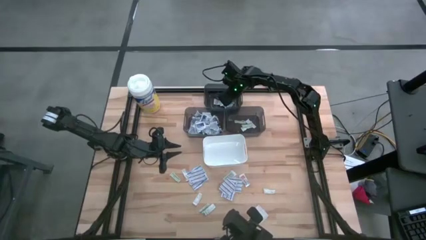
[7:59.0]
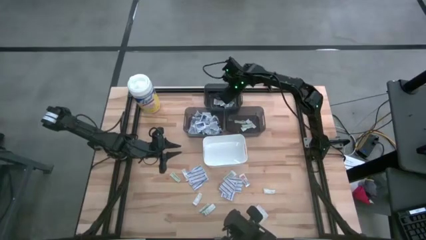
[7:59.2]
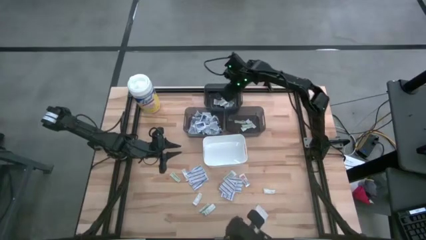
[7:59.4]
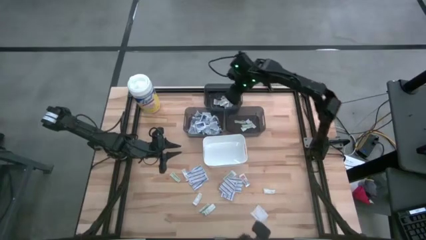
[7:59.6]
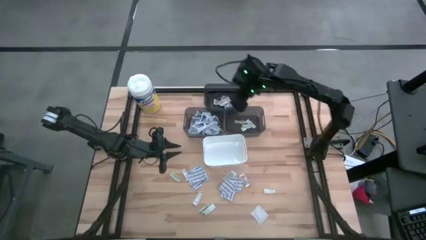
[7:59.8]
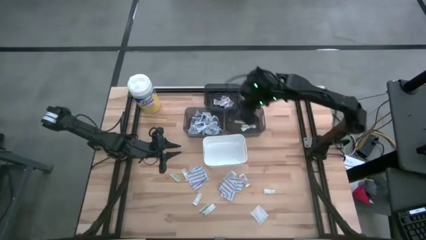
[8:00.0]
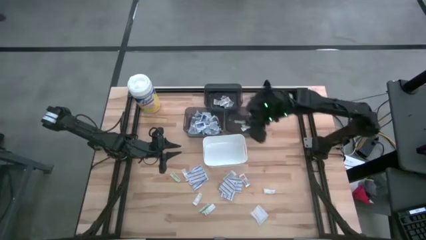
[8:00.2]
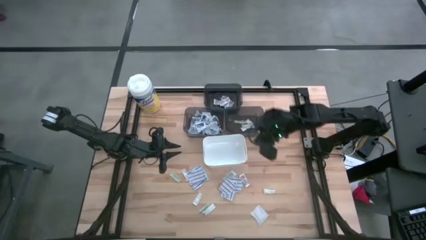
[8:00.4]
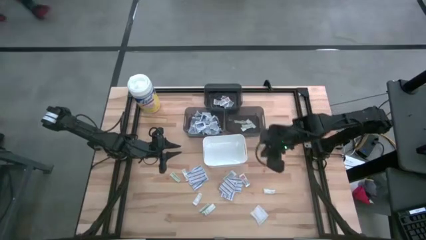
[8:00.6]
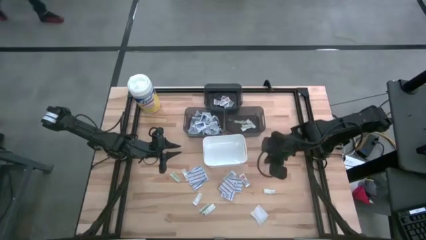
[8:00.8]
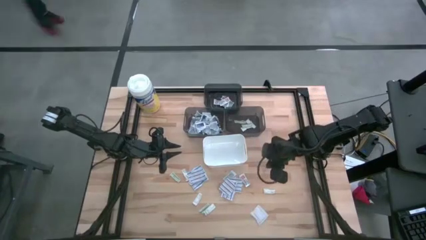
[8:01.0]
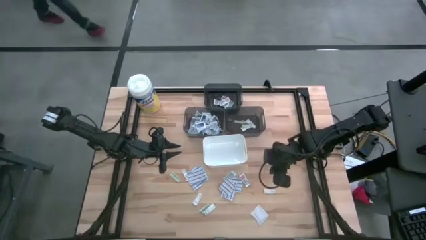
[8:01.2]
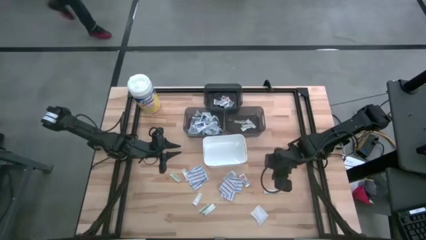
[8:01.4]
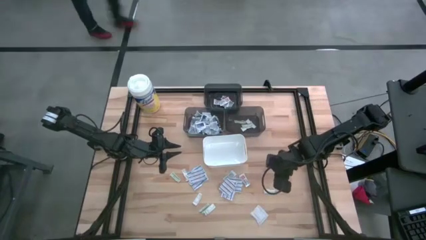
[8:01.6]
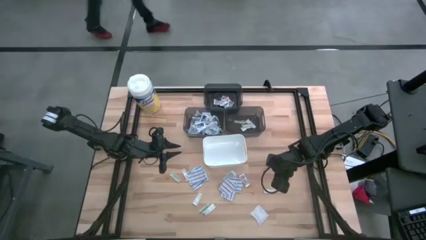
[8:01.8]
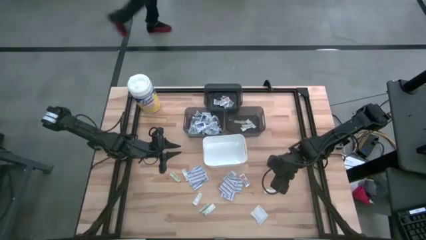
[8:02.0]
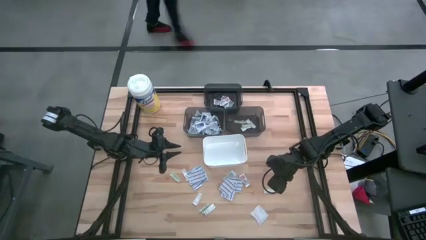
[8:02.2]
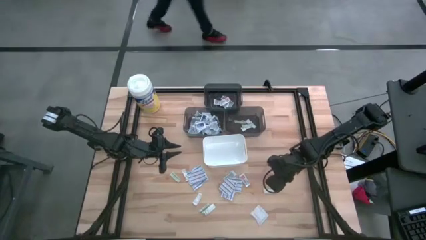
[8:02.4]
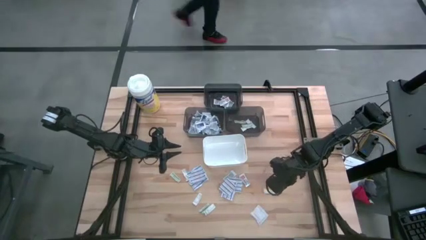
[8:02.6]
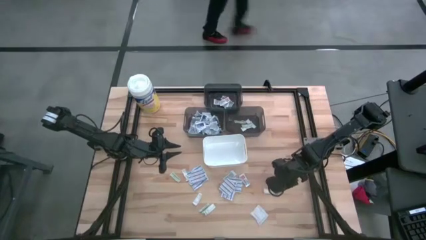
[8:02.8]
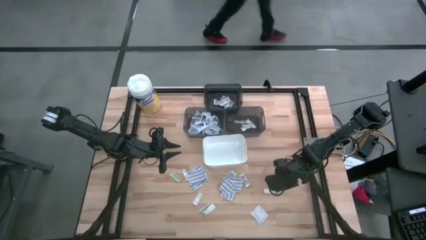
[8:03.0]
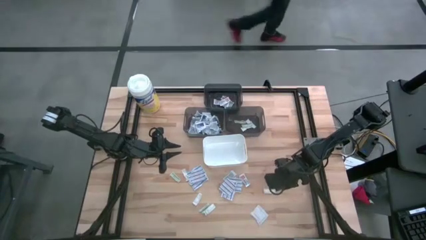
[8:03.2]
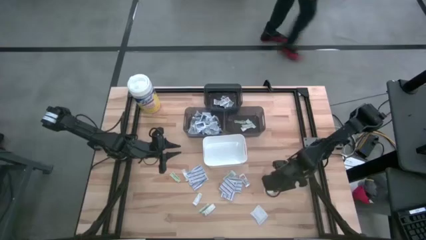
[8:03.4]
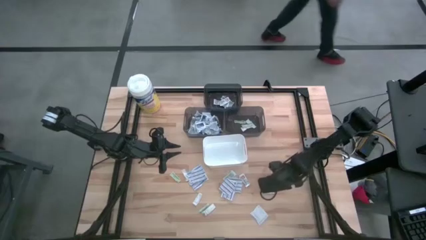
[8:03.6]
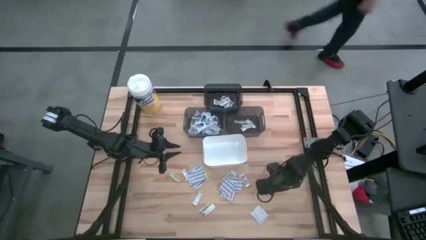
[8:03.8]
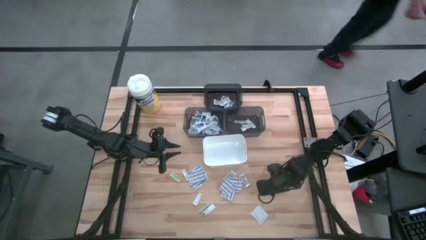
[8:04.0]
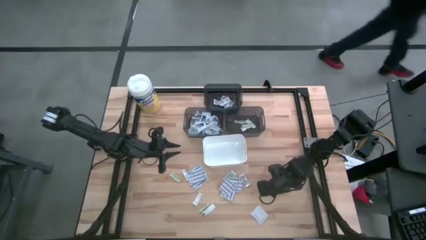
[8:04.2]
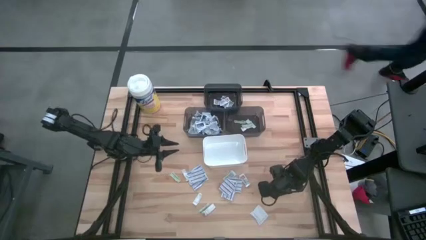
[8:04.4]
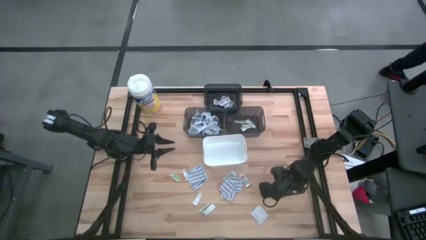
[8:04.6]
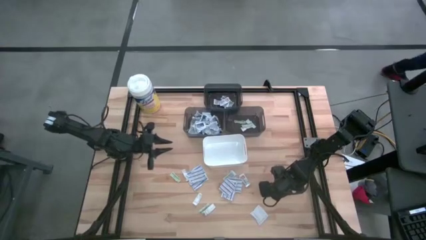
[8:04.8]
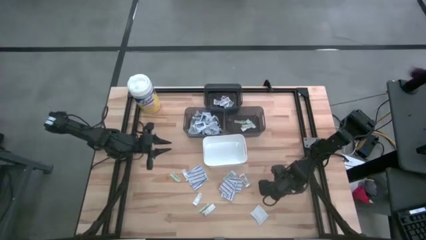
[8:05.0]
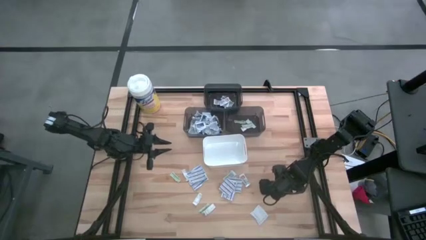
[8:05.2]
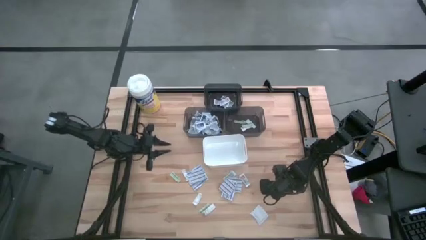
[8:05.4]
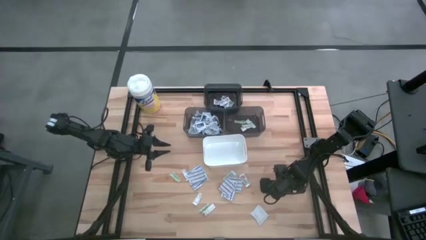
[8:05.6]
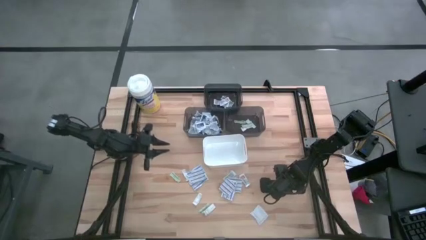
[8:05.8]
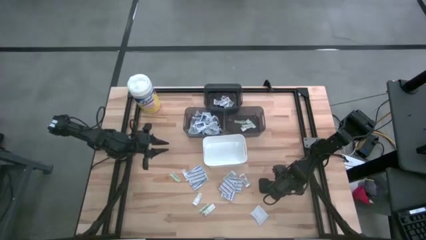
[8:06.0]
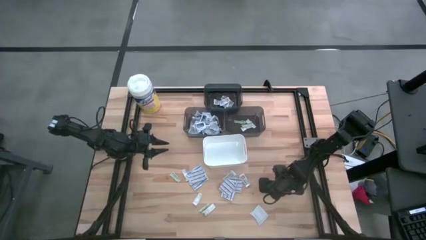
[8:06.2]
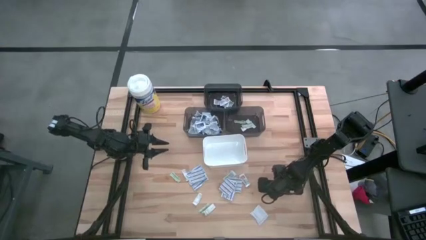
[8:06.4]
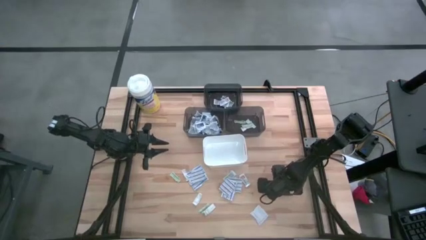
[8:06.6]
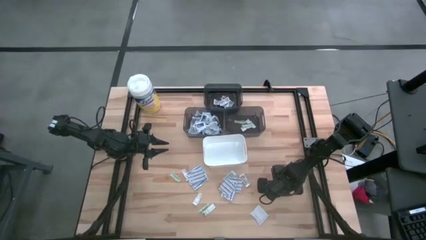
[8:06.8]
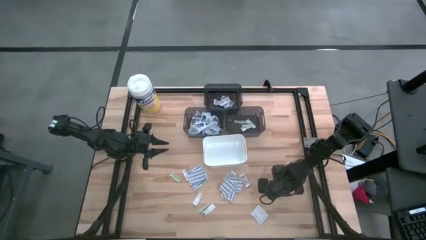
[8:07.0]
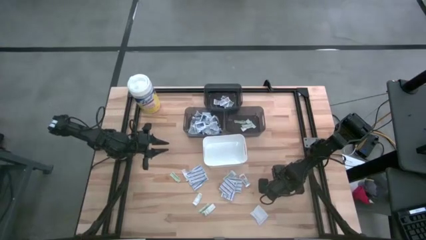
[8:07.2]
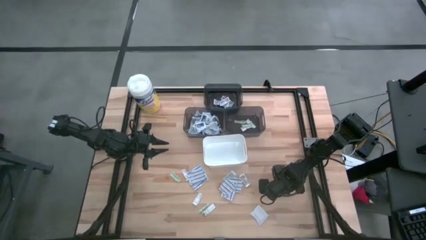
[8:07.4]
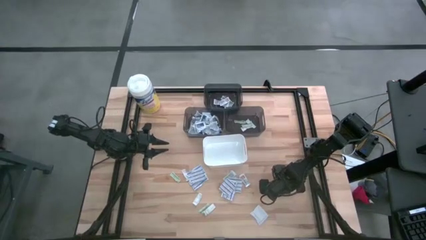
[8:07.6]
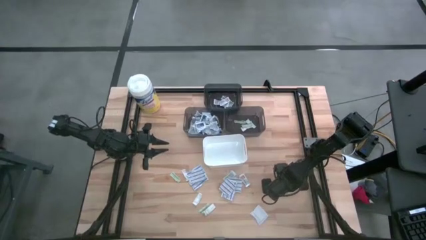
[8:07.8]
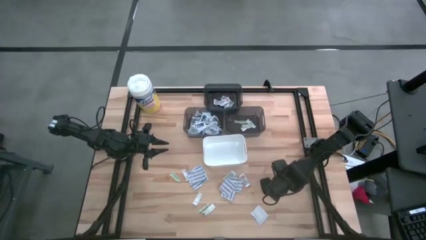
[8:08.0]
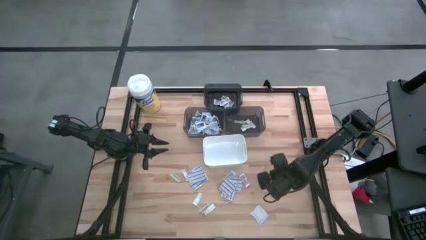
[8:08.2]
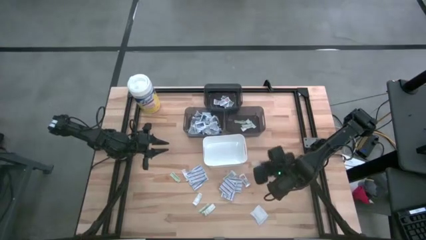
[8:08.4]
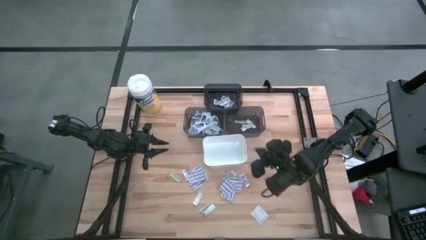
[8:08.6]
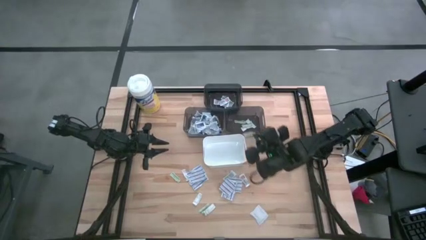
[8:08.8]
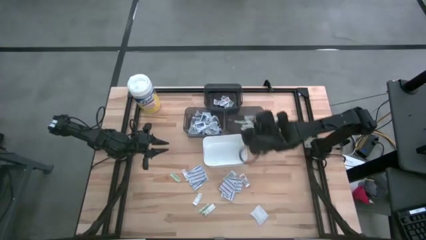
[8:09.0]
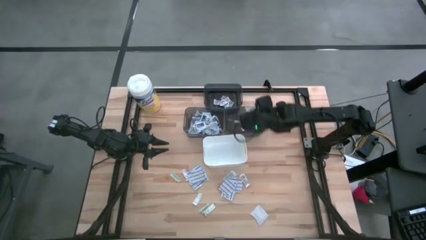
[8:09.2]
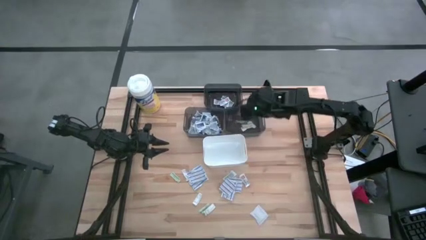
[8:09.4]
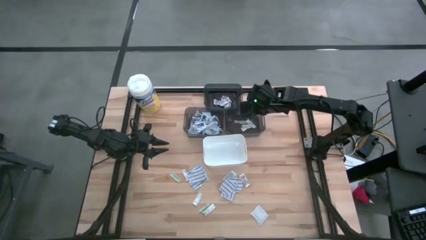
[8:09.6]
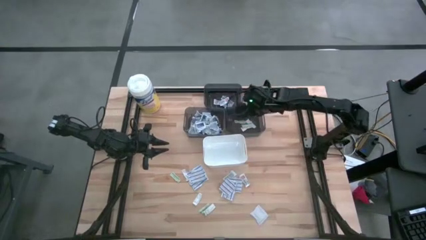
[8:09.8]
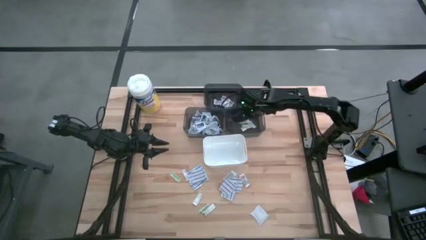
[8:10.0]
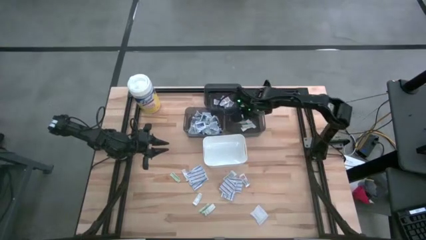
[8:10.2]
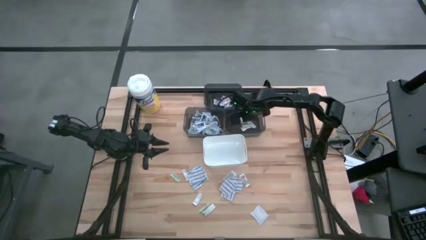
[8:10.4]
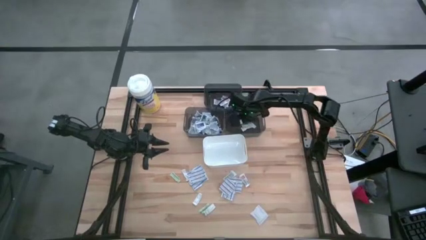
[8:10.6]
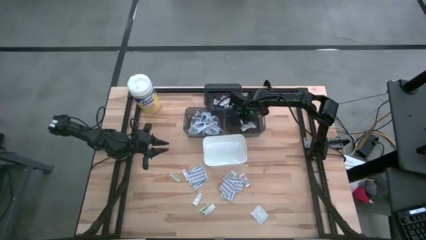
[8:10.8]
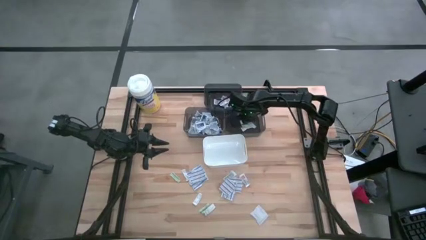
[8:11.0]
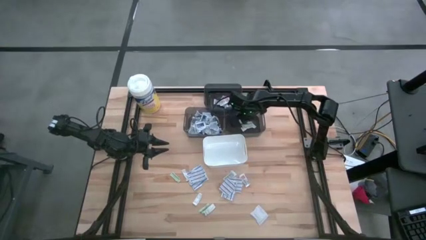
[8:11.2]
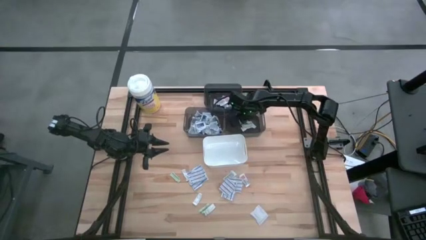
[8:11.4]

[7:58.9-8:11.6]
Task: Pick & Place First Aid Supplies
Put the green bandage into the bottom right black bin

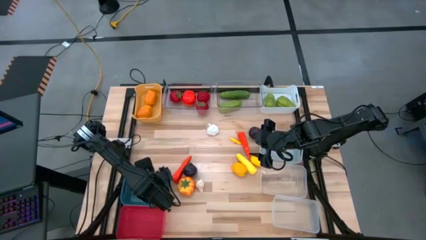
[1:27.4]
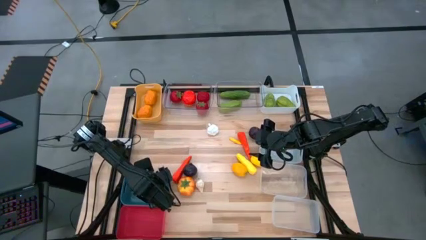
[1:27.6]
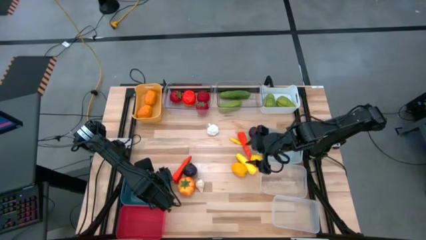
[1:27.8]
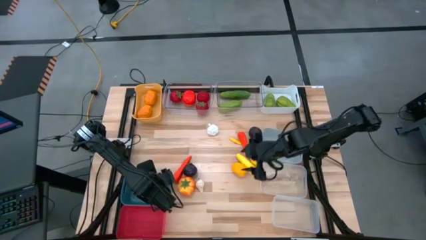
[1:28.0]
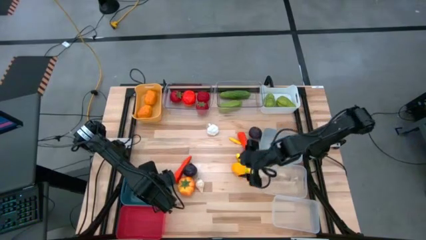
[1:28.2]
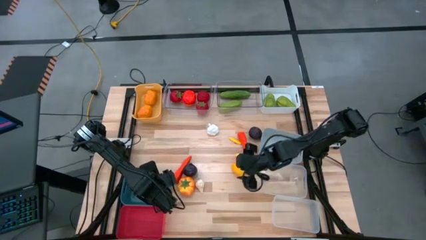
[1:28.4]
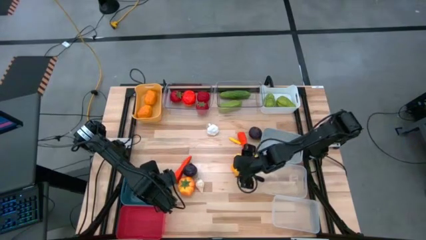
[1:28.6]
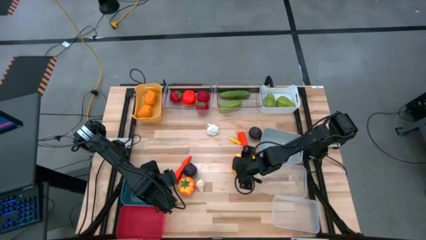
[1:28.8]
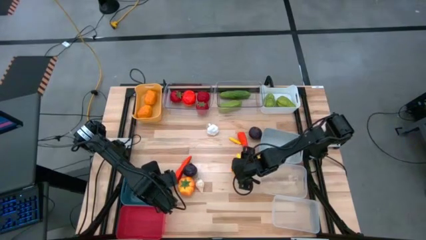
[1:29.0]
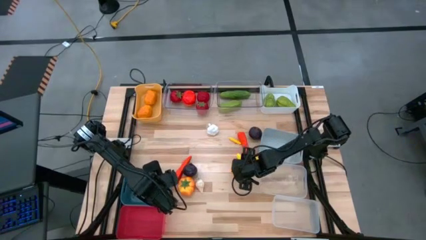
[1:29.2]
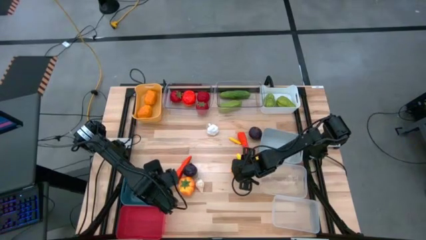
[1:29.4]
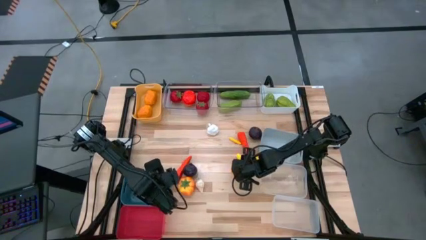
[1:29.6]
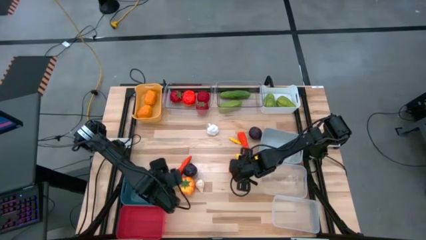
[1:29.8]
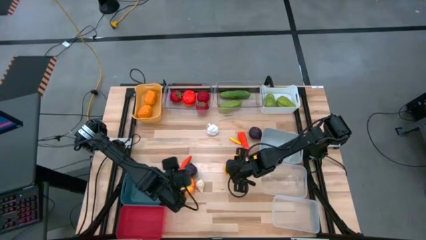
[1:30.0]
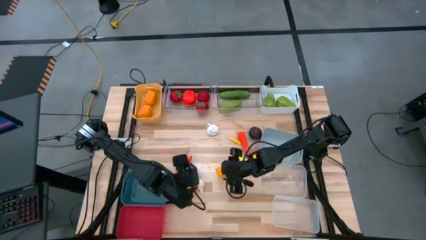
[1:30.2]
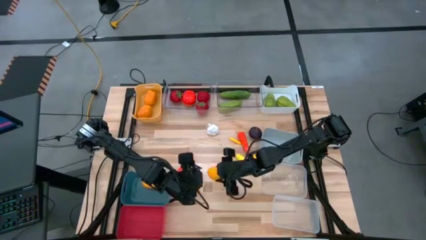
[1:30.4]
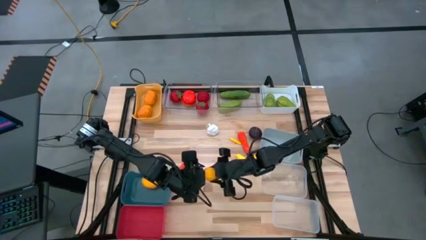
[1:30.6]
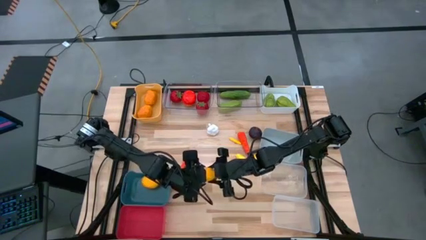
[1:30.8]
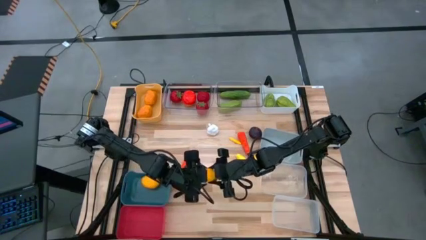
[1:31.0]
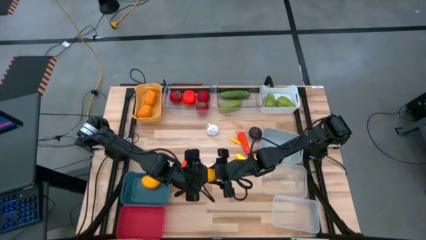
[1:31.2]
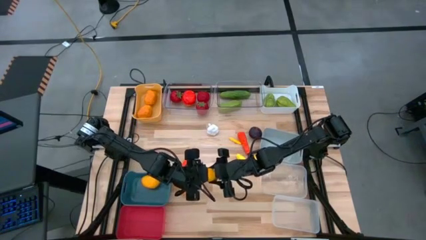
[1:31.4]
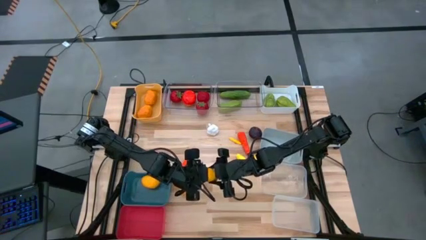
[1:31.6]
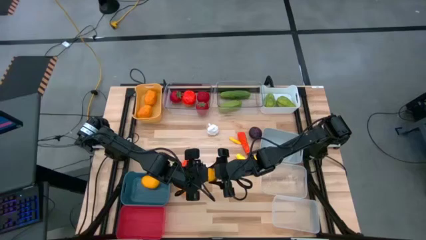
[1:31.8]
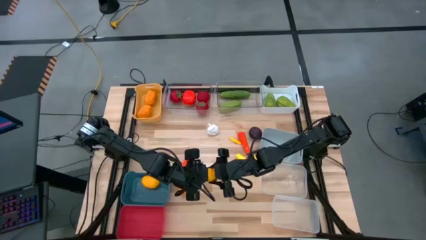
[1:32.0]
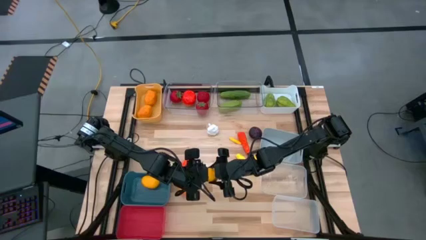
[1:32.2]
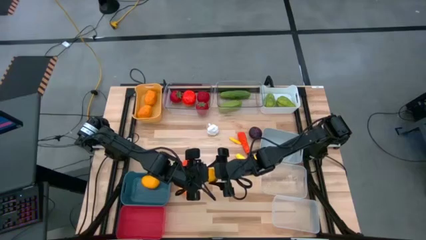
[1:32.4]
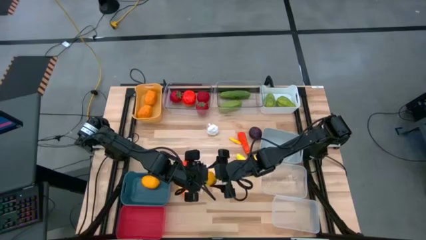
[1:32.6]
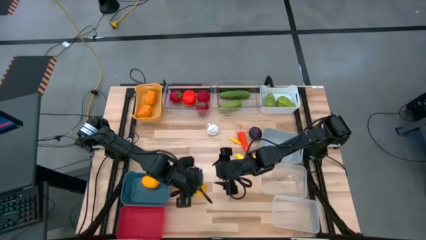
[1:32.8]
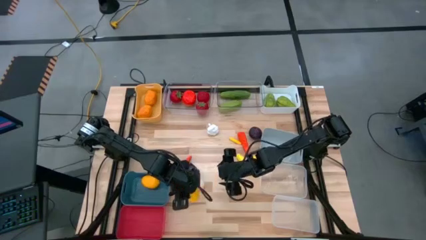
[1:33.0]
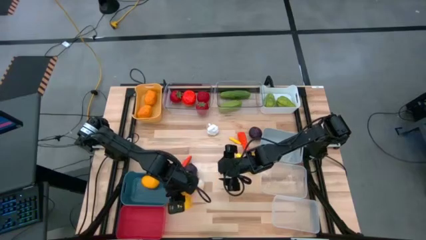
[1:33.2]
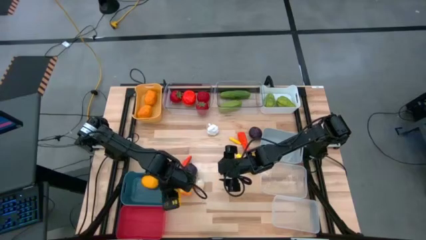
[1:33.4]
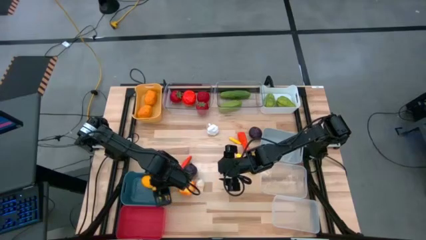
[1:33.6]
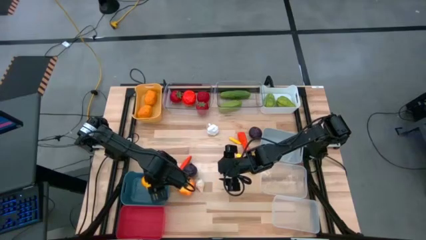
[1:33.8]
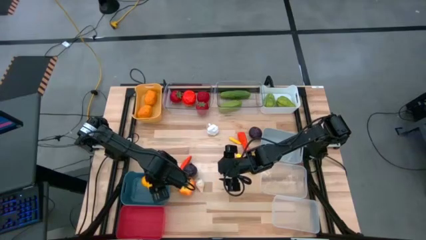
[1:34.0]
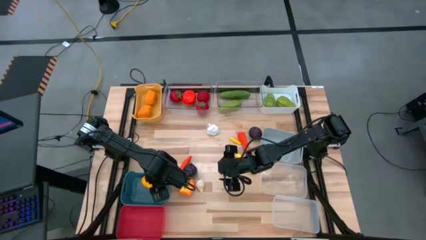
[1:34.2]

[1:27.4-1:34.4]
Task: Sort produce into baskets
Put the yellow lemon into the blue bin
